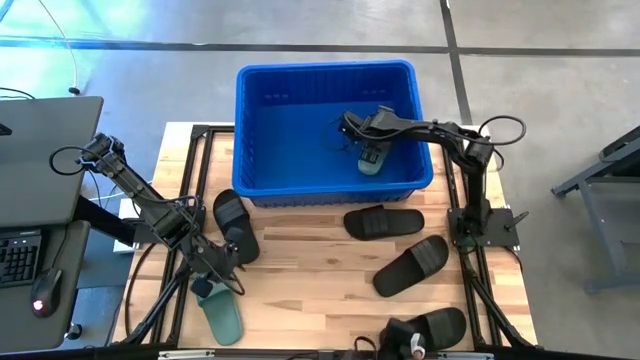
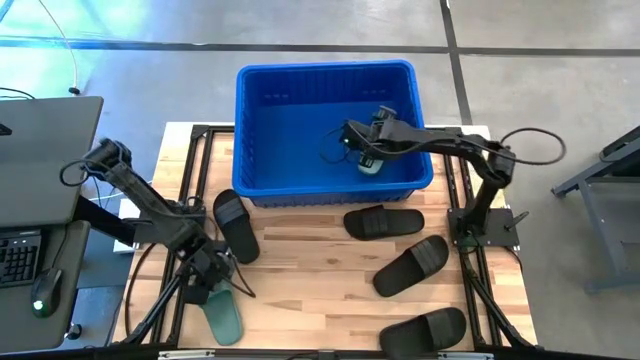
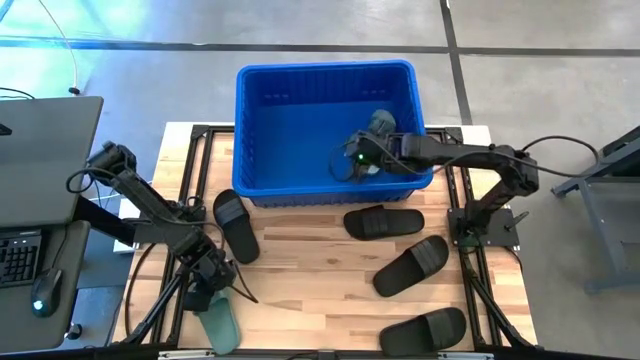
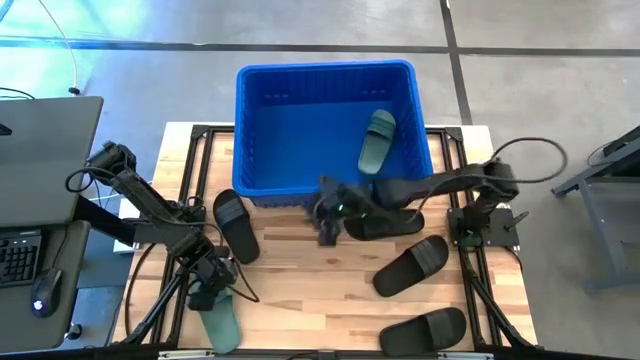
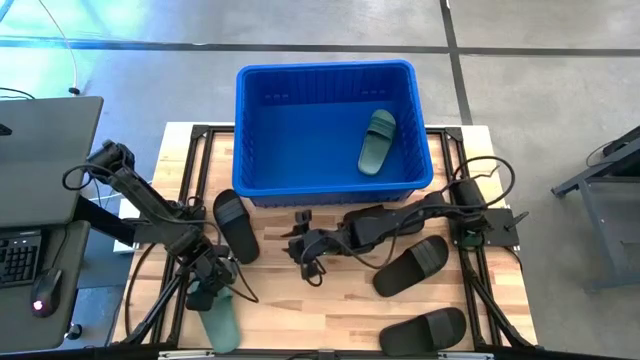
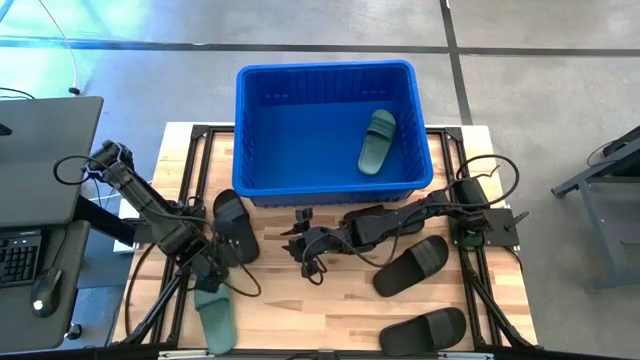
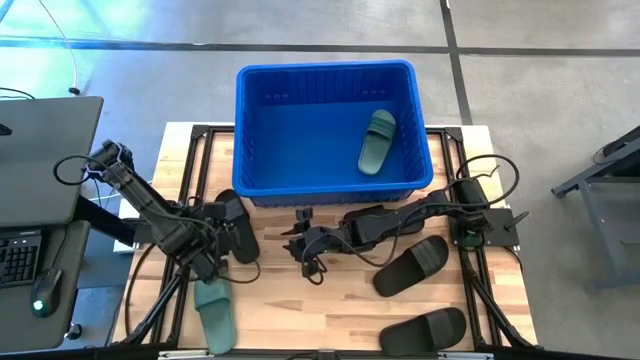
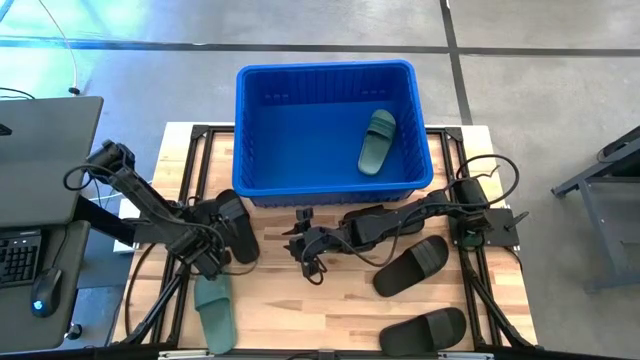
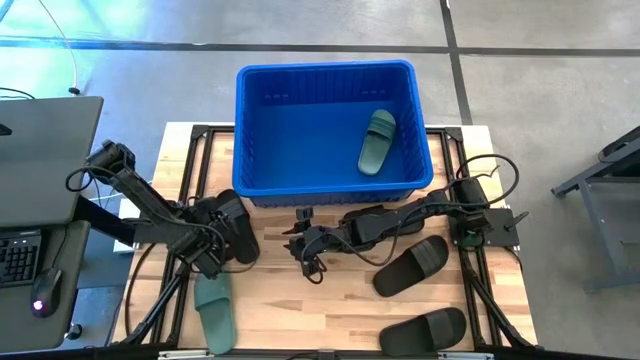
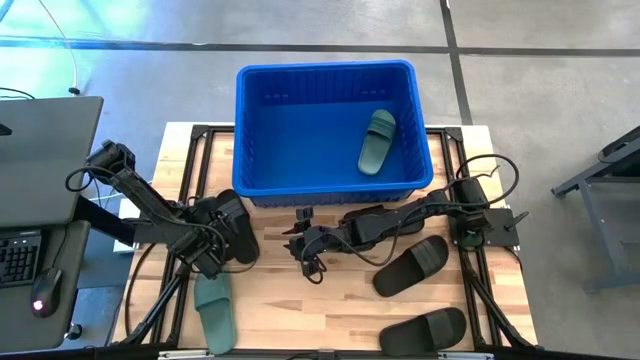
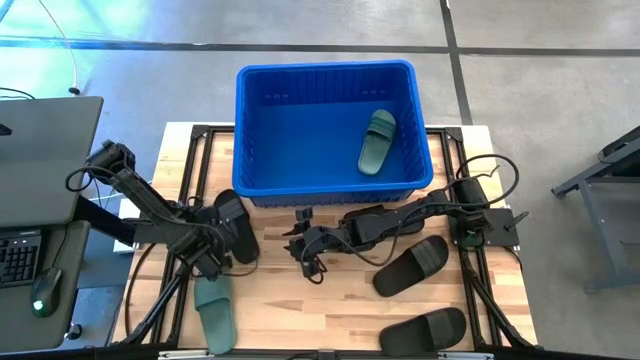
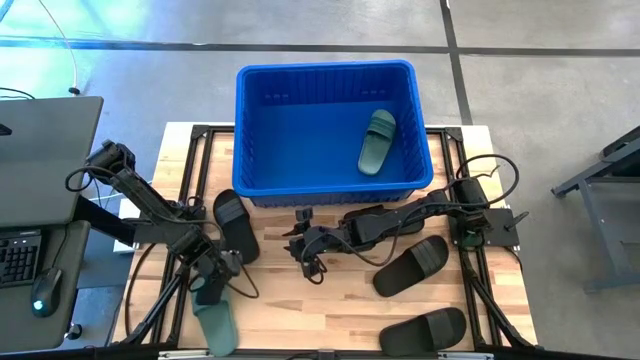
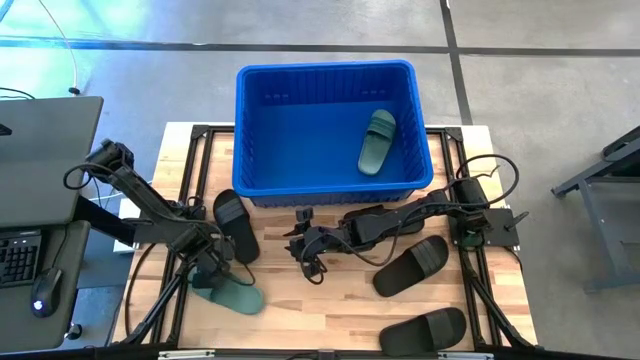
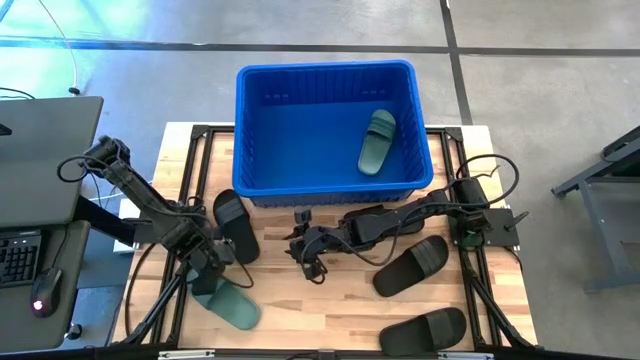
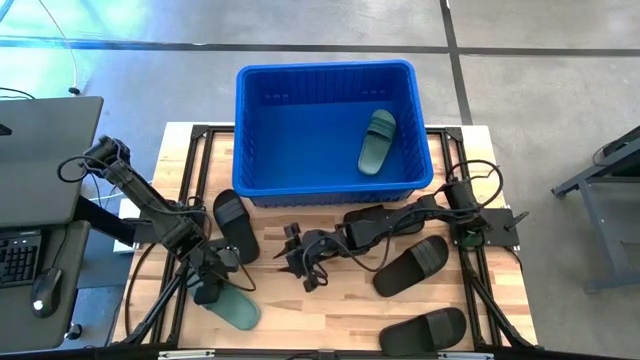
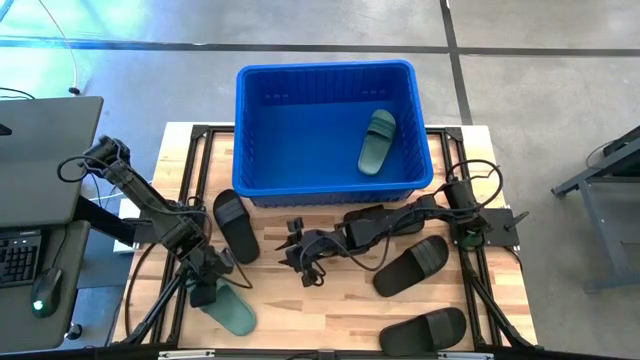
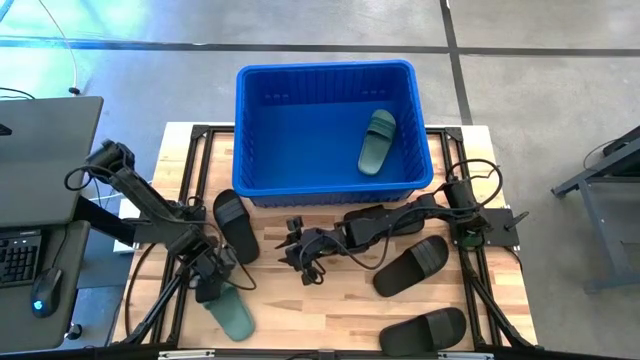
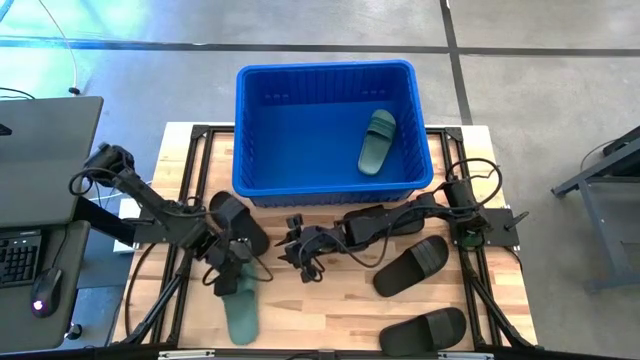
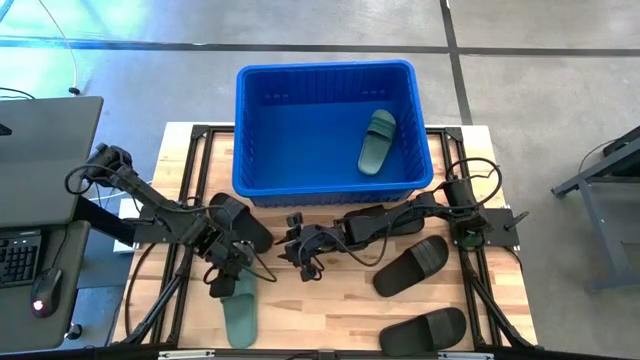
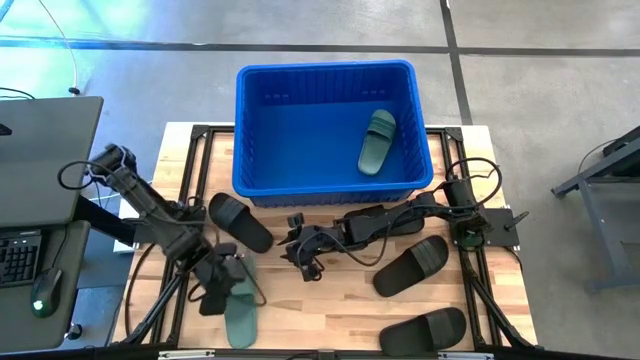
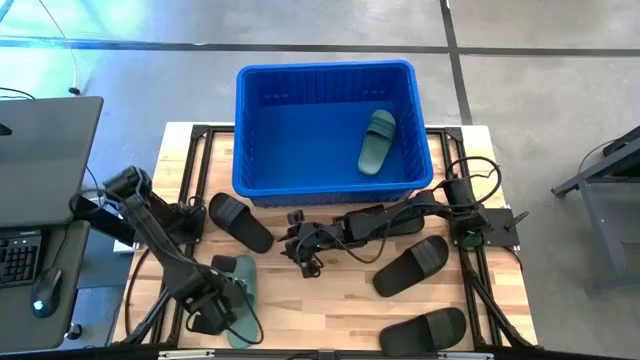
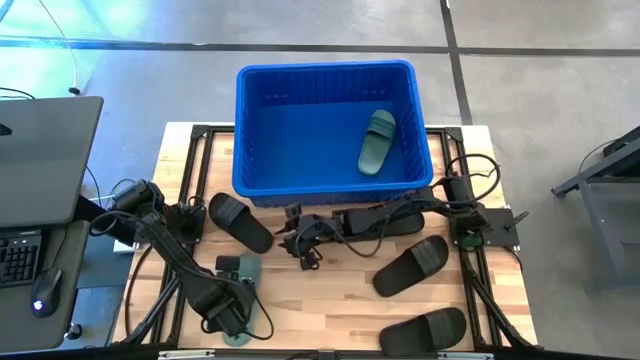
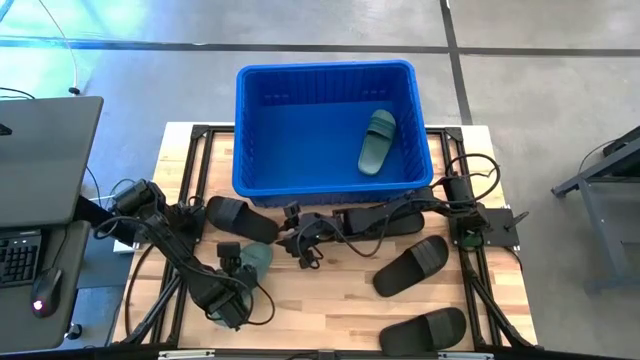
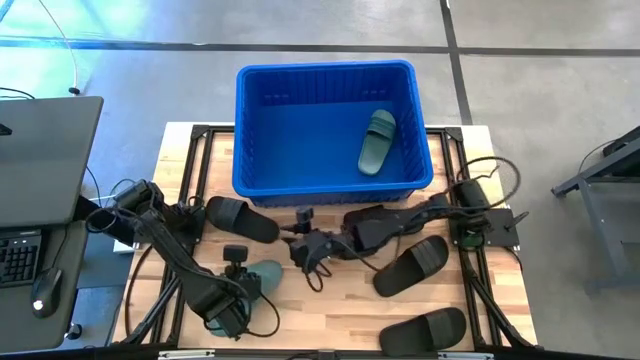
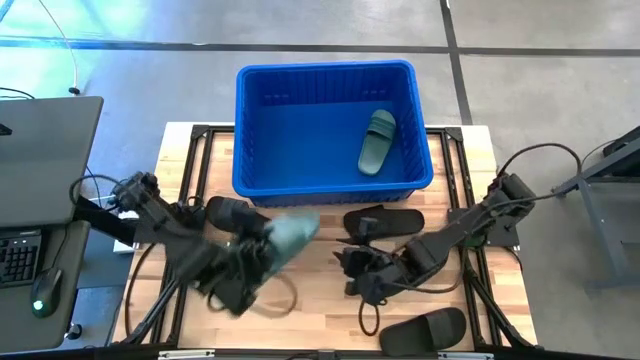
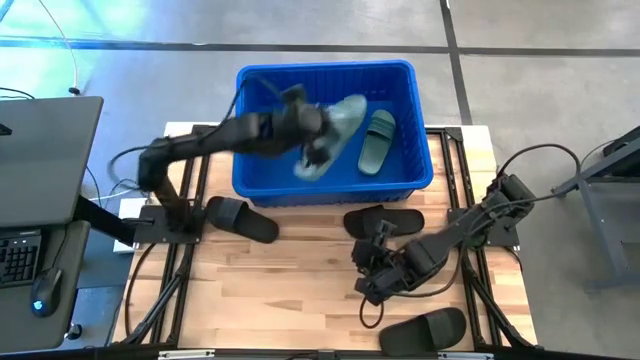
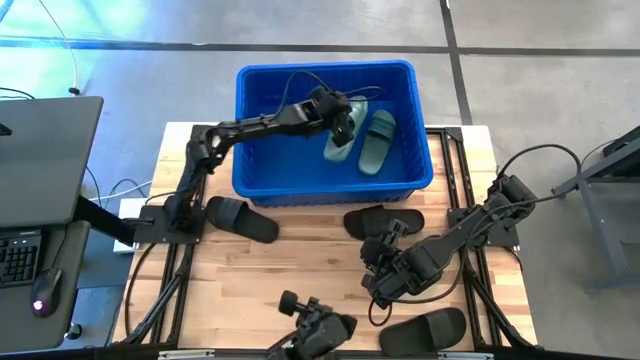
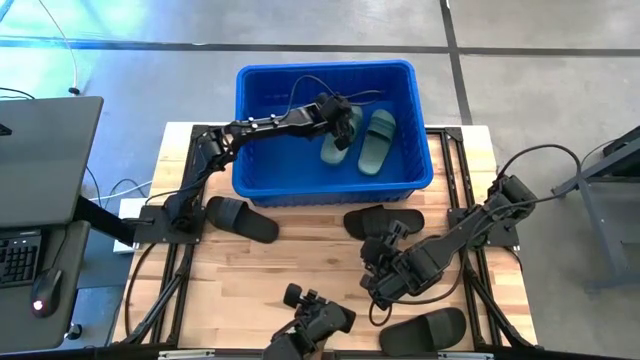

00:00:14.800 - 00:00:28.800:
Task: Pick and place slides into bin
Put the green slide into the blue bin

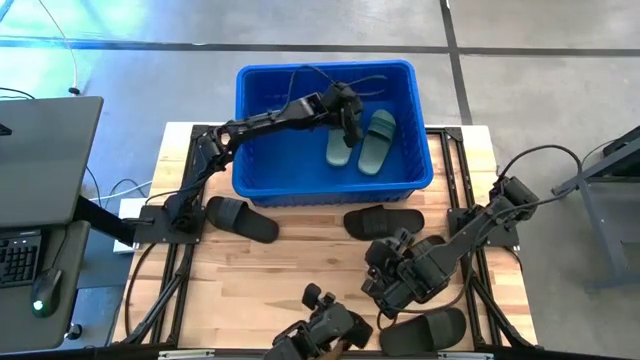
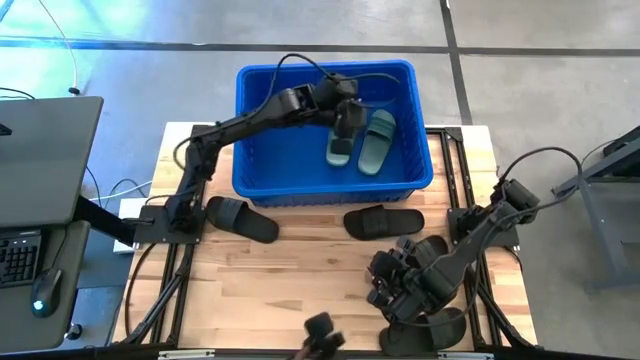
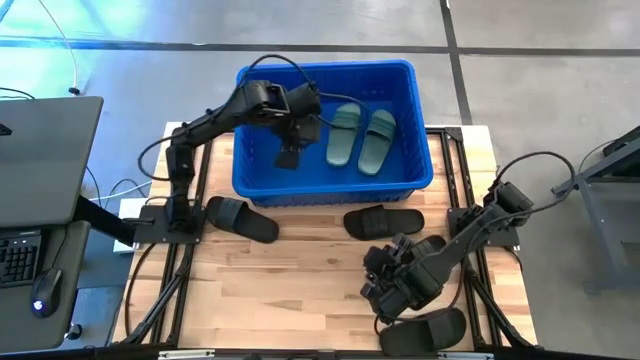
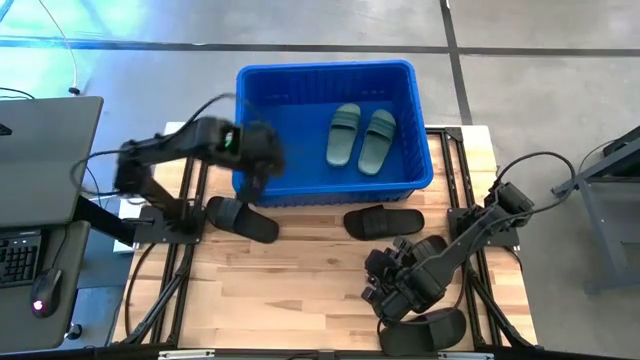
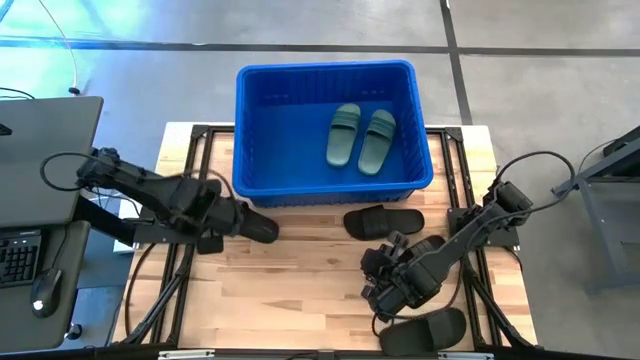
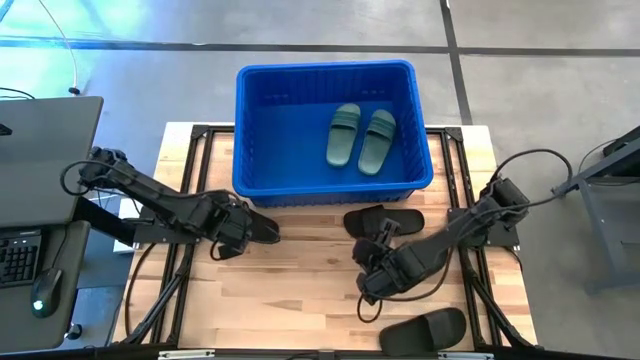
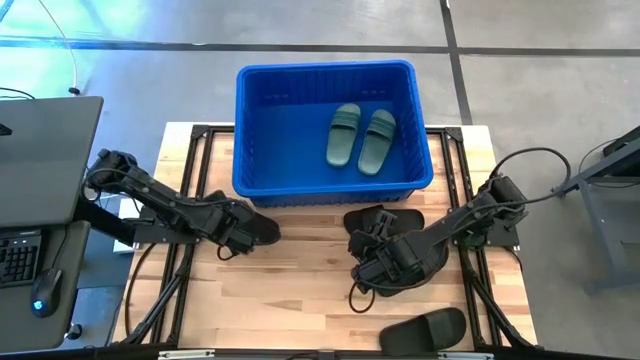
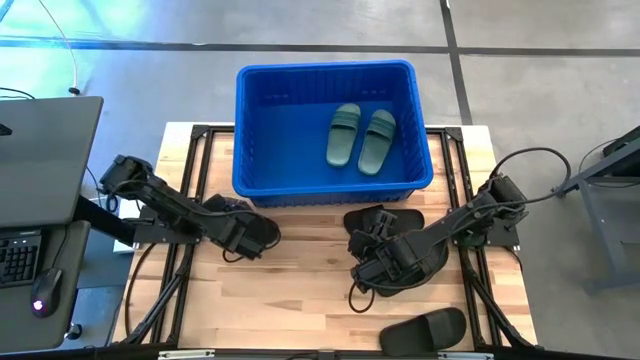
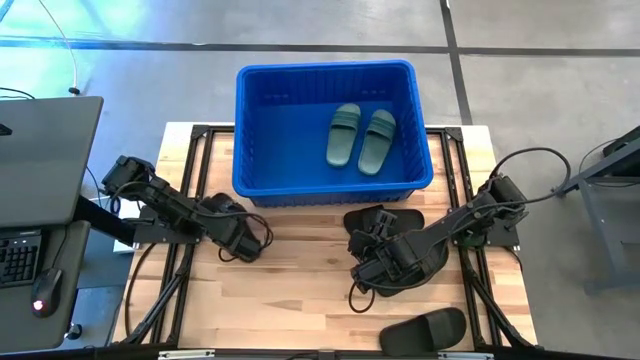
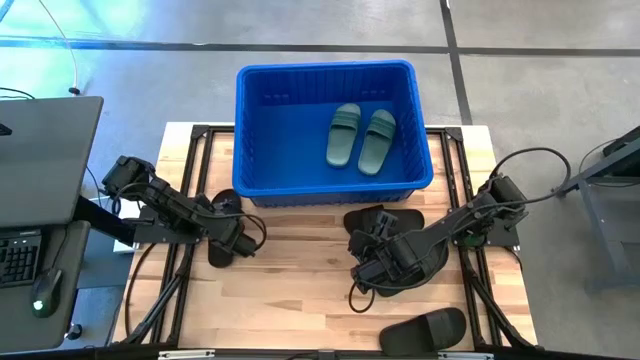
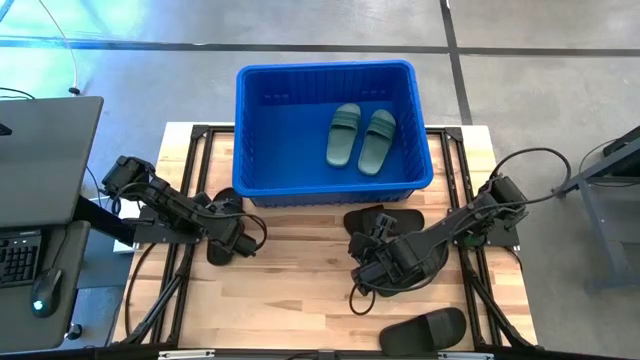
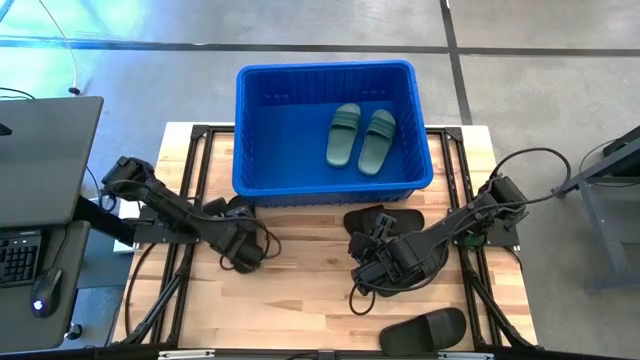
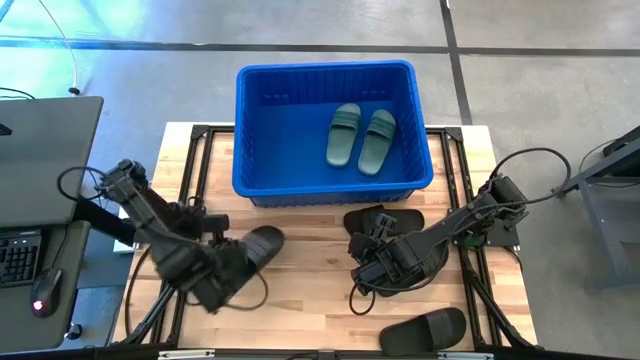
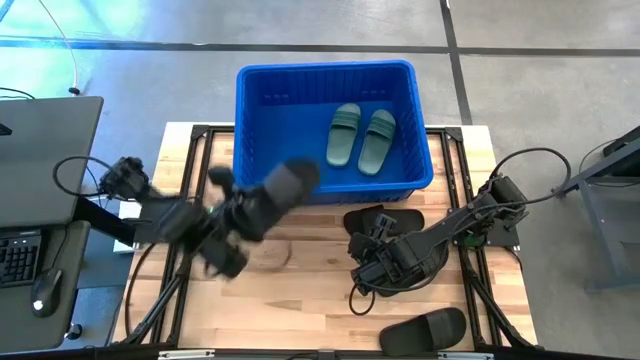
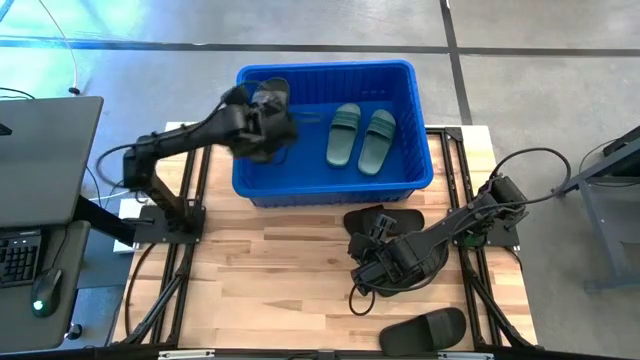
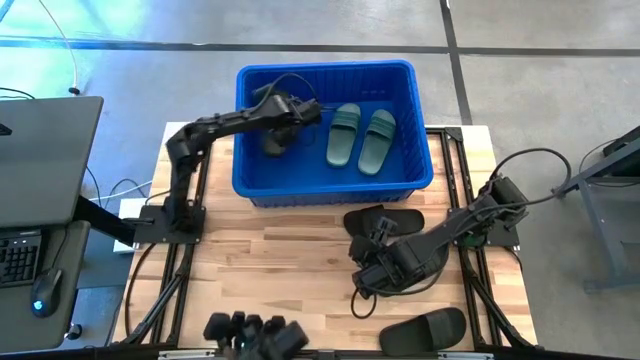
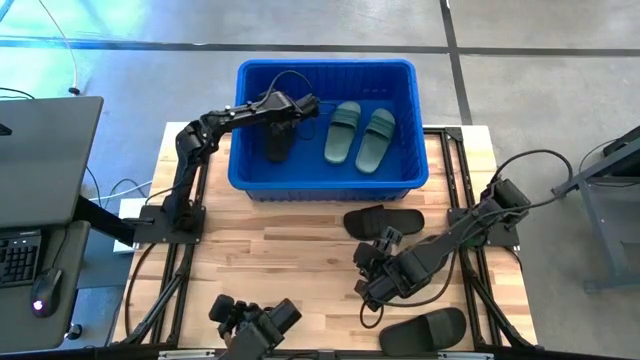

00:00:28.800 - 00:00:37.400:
Put the black slide into the blue bin
